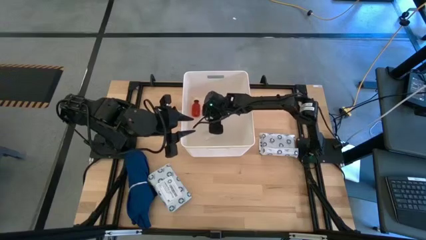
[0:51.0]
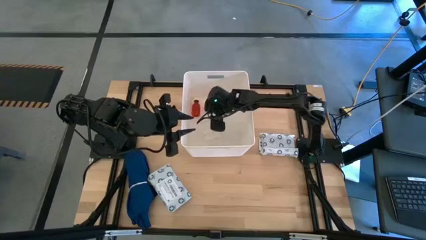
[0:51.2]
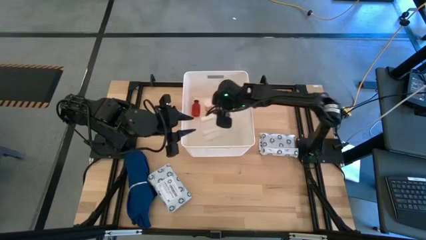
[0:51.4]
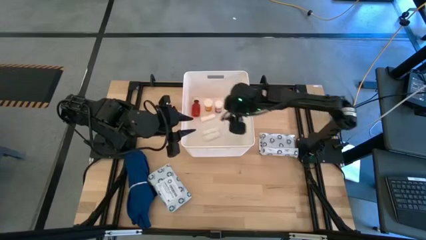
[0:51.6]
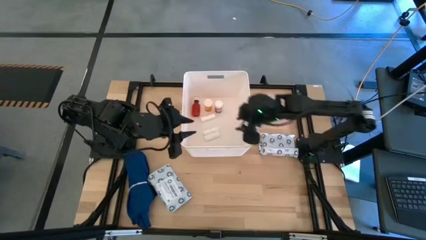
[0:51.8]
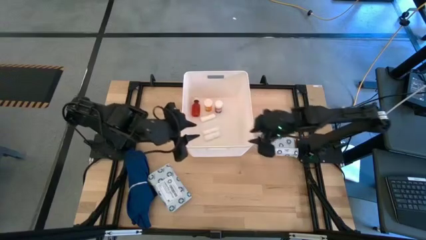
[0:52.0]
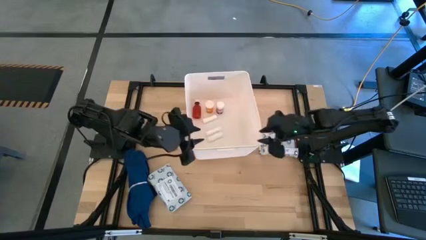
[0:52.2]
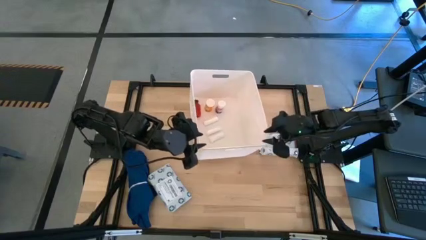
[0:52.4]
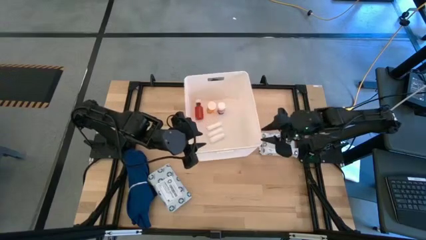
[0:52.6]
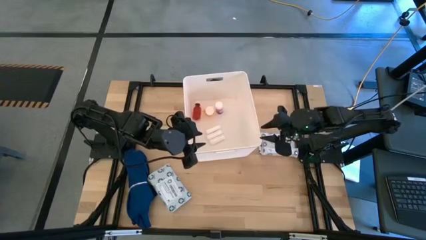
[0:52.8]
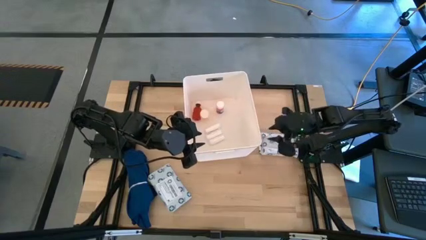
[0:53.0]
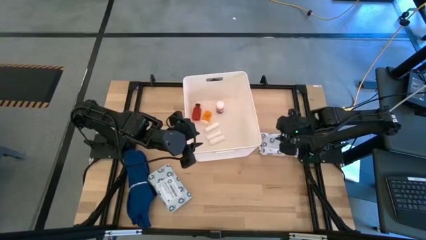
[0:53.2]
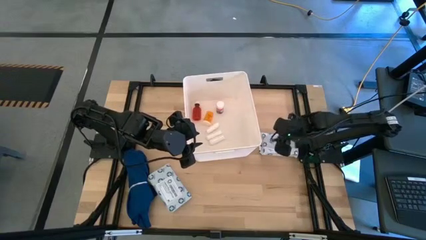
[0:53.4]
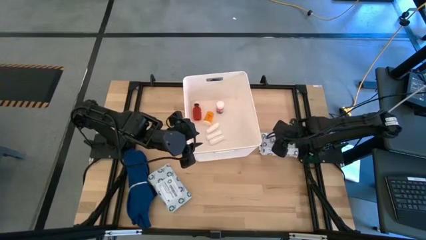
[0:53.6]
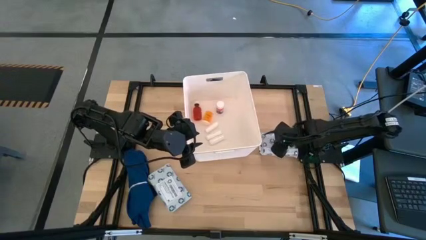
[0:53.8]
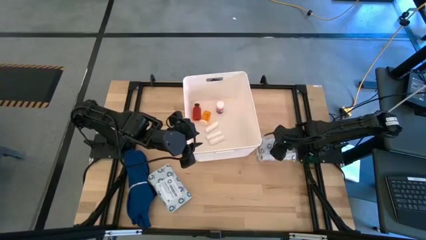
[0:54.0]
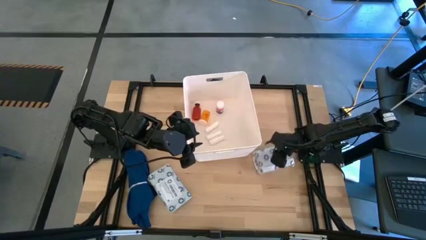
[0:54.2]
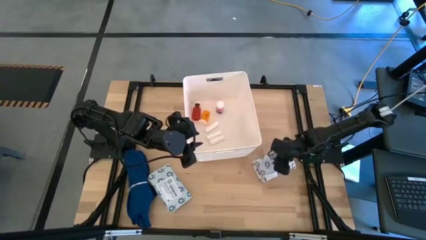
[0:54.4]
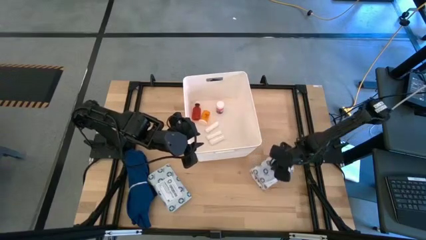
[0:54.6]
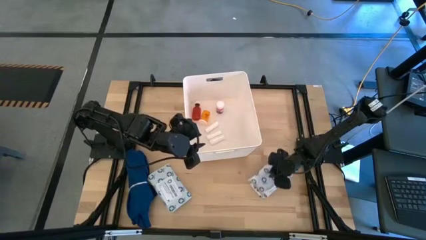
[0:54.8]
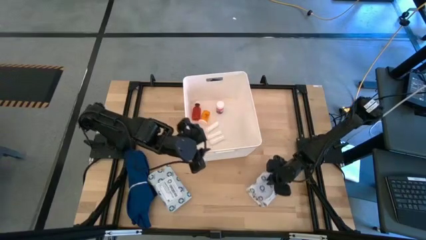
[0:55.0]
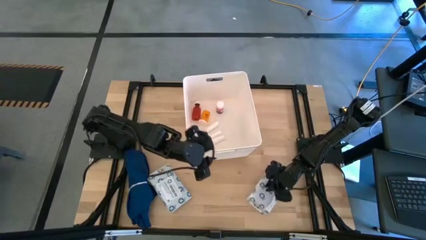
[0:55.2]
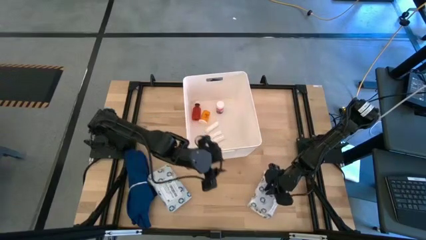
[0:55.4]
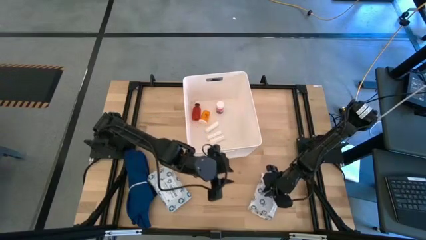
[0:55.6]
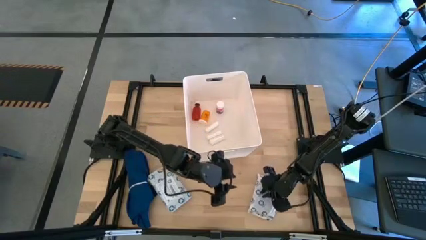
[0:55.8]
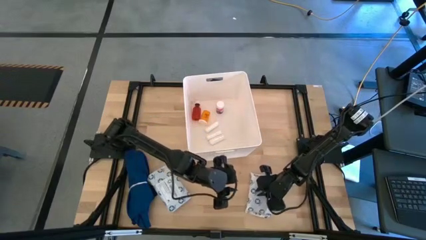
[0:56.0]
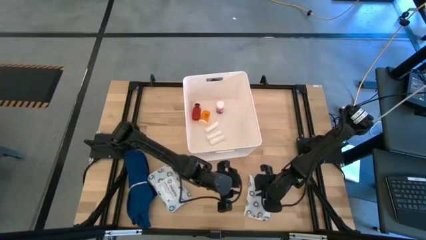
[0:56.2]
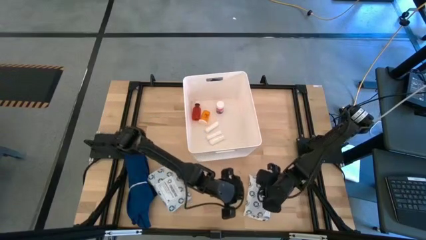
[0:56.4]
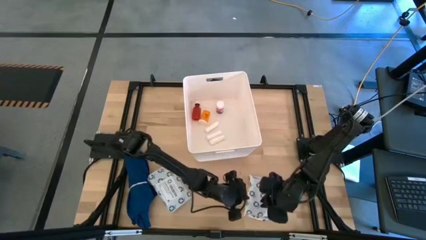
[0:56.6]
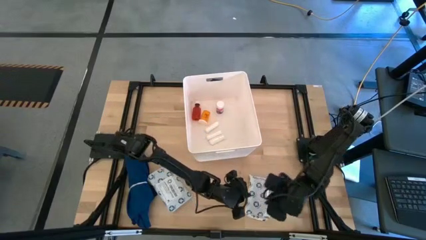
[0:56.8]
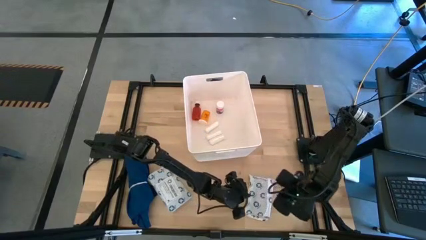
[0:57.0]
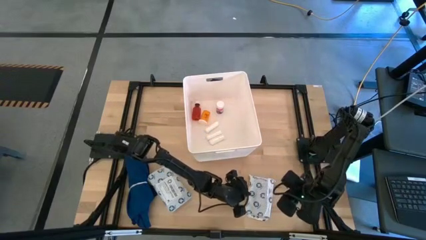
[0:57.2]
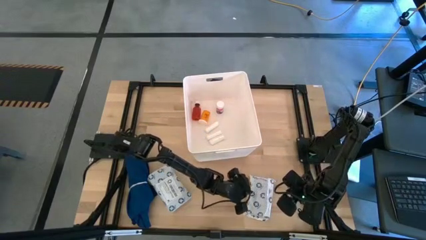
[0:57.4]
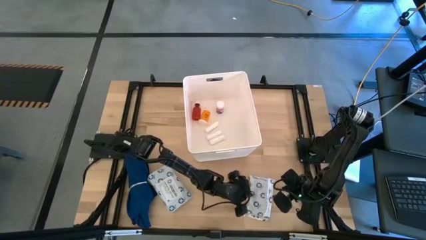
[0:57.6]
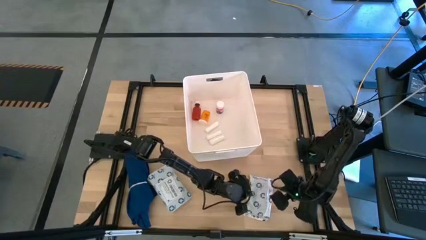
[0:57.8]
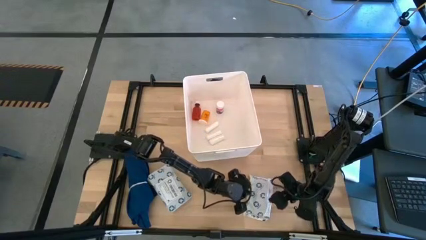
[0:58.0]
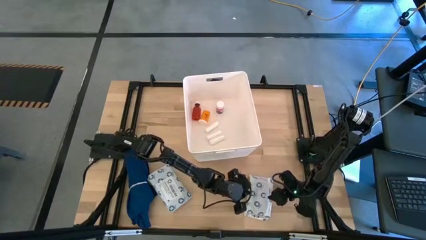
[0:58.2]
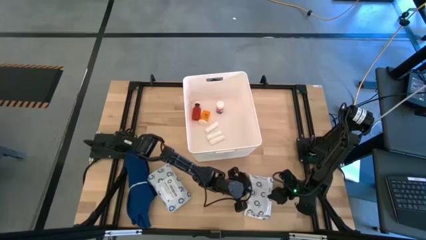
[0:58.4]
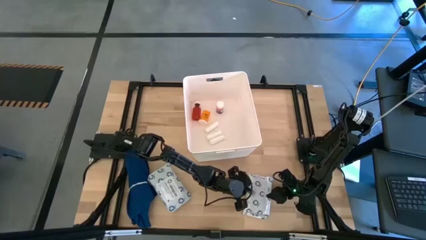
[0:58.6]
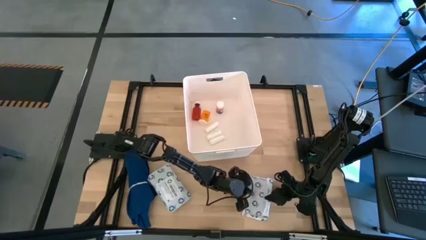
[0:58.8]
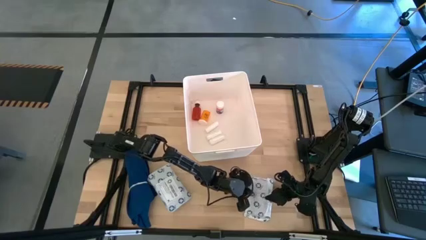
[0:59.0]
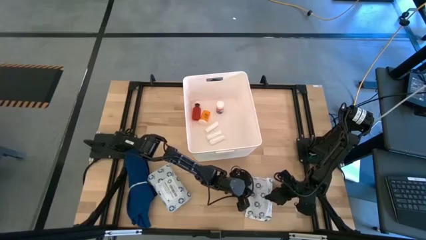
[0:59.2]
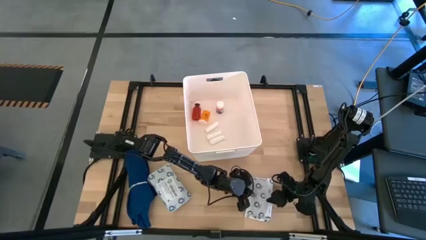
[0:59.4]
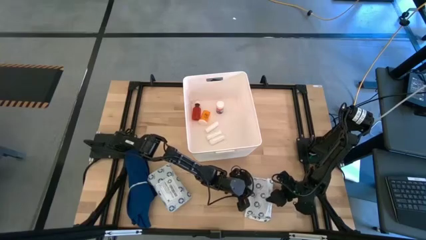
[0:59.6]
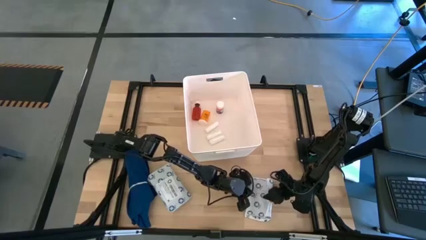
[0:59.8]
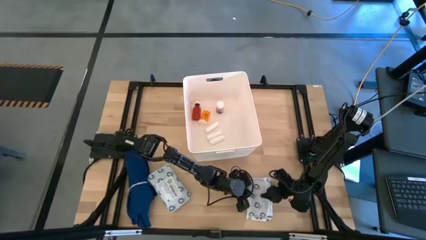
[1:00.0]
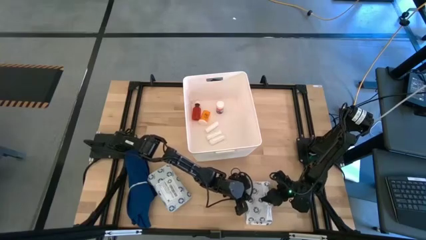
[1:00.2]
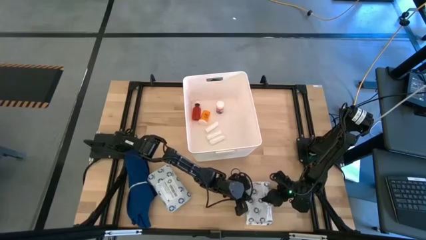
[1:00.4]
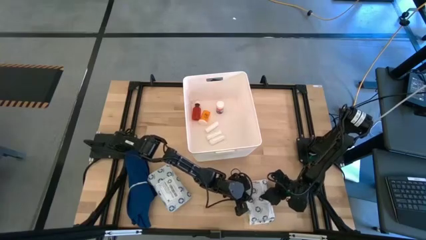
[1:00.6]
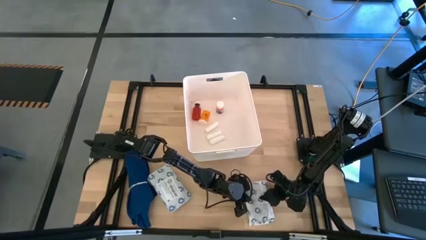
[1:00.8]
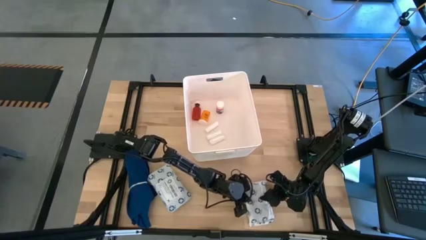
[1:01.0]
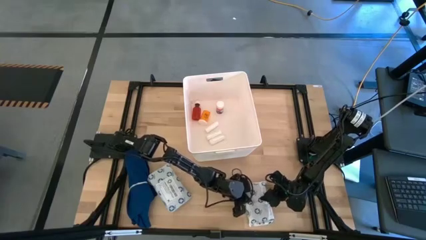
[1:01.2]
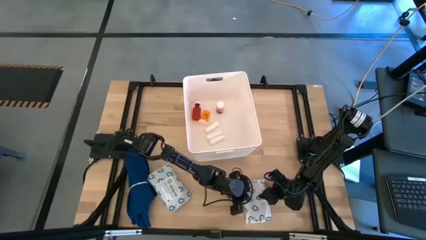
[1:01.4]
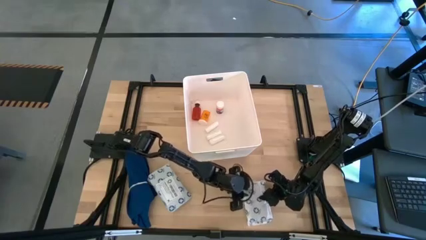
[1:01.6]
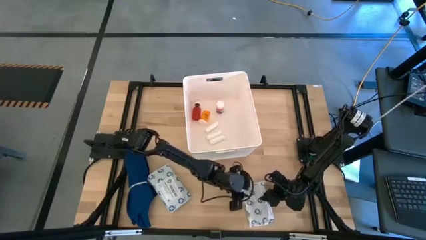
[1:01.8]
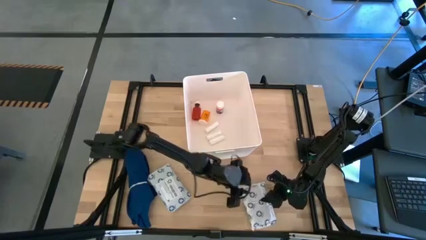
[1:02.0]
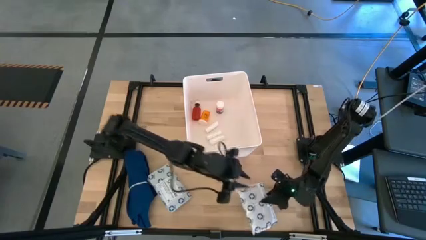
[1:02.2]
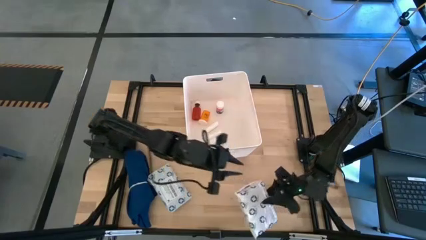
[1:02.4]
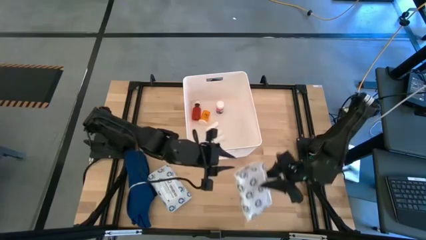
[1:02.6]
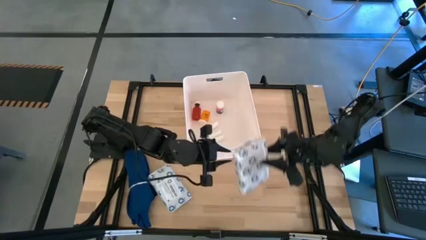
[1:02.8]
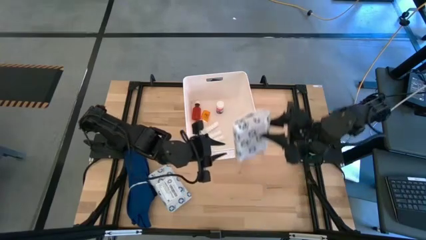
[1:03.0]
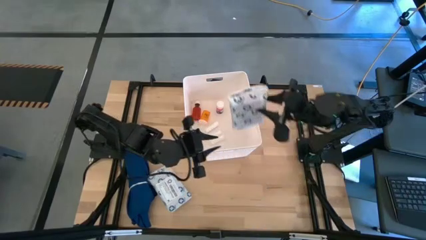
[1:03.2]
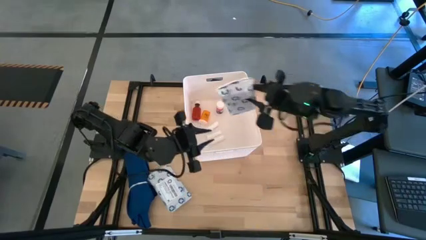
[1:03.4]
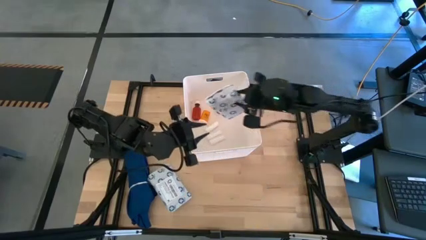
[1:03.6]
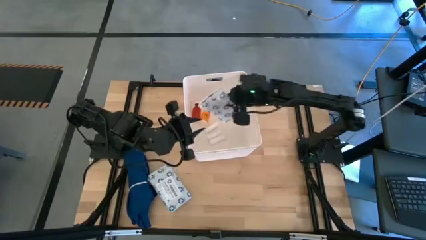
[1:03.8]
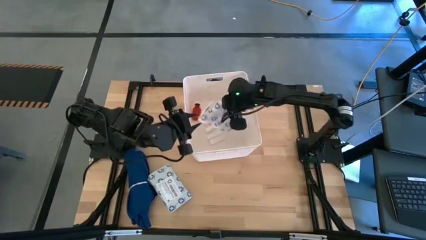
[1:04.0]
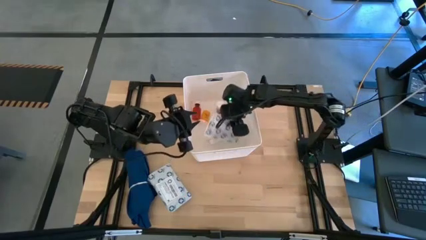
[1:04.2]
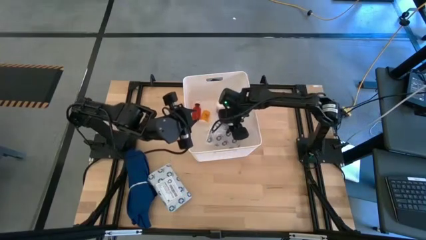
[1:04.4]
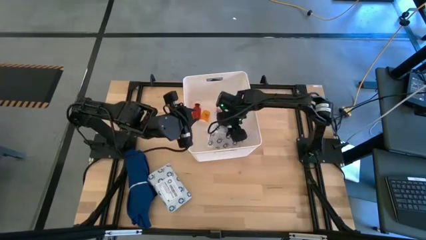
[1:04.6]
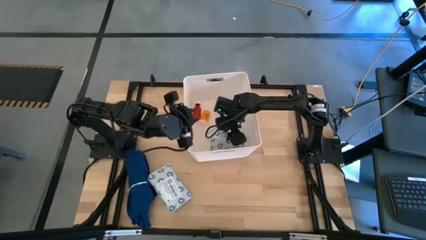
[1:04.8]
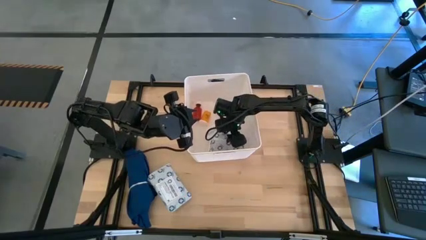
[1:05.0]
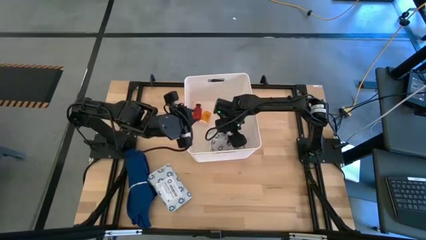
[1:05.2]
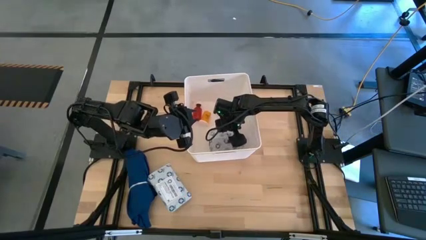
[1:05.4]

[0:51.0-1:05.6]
Task: Pick & place medical supplies in basket/bin
Put the right mailer bag into the white bin
